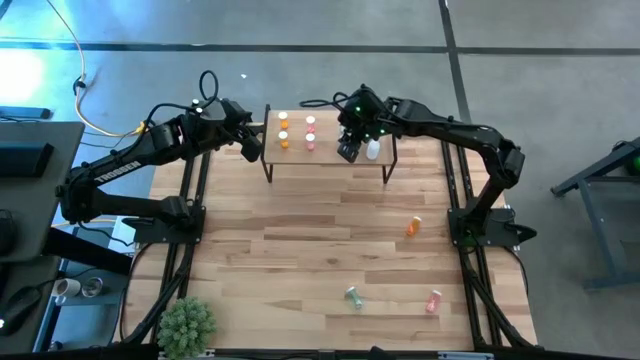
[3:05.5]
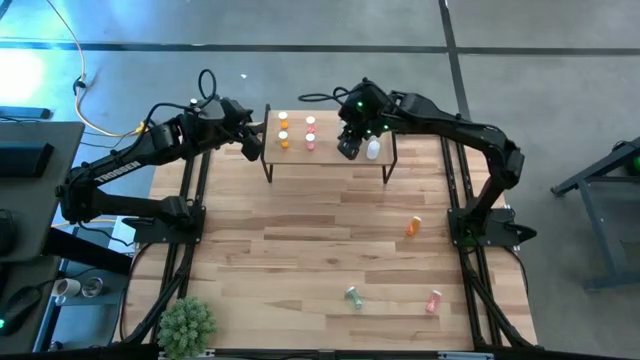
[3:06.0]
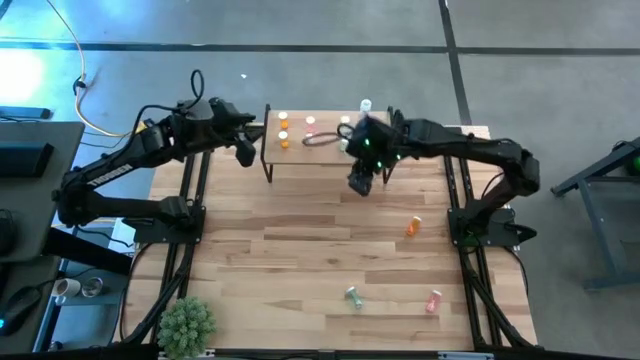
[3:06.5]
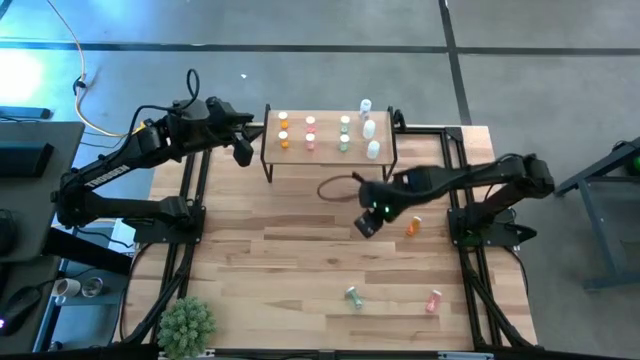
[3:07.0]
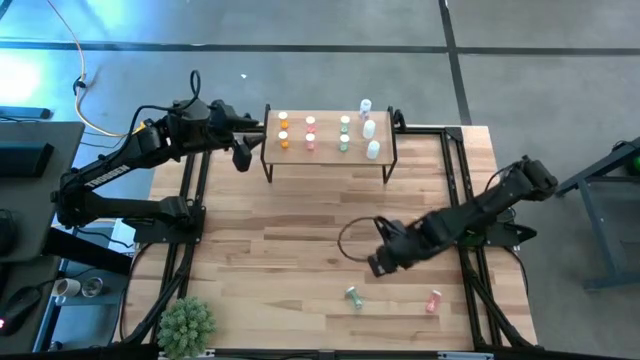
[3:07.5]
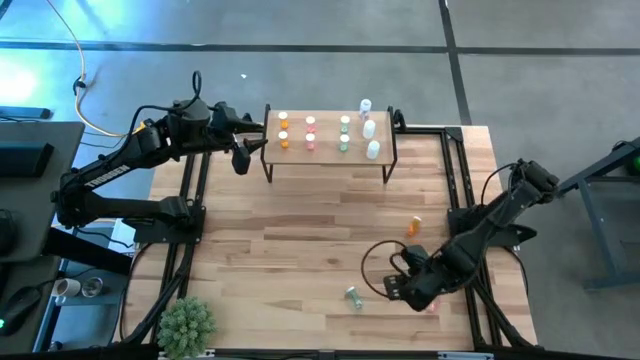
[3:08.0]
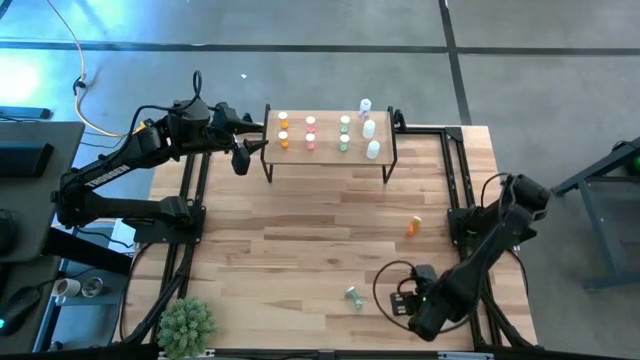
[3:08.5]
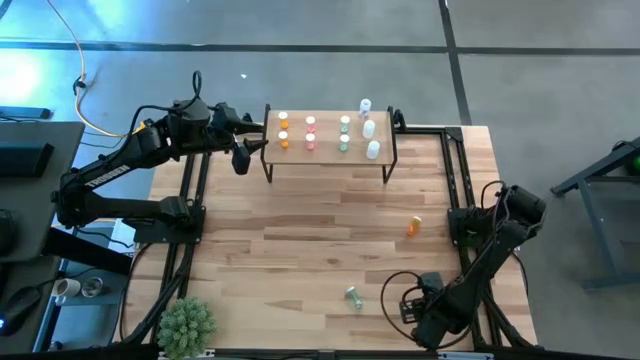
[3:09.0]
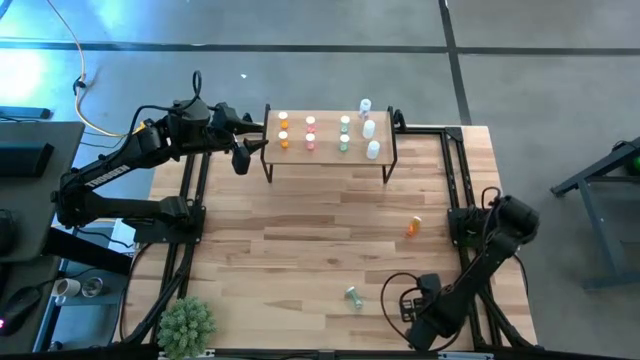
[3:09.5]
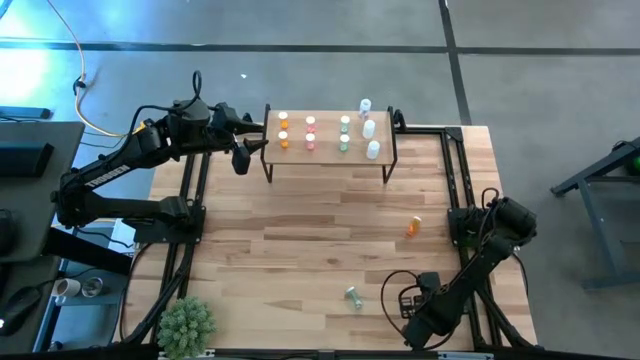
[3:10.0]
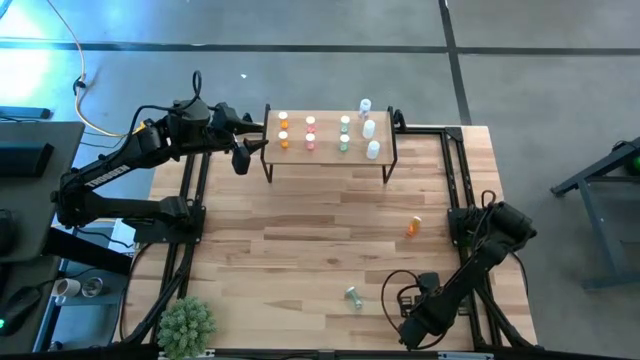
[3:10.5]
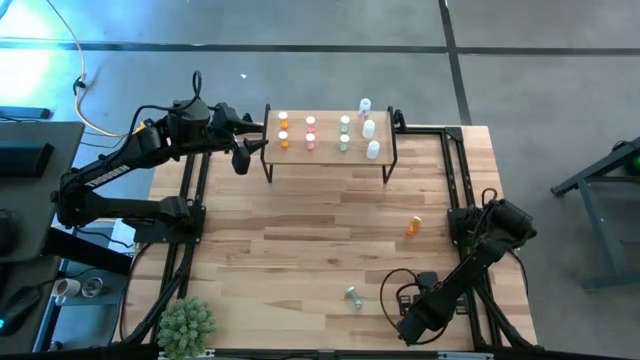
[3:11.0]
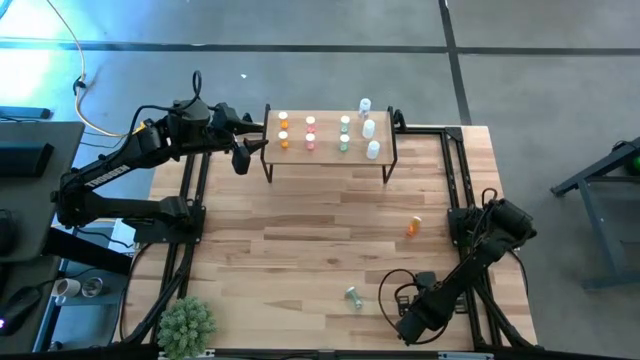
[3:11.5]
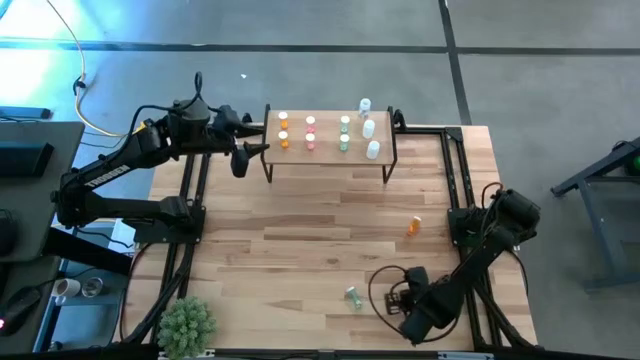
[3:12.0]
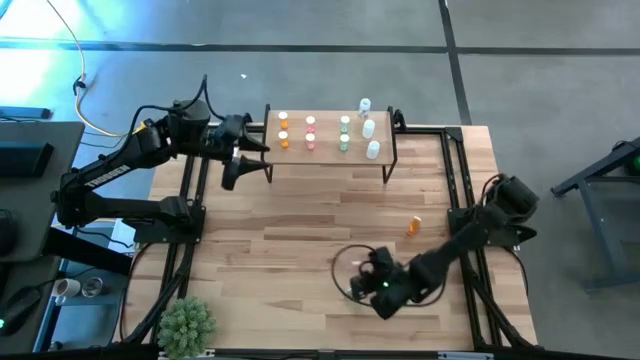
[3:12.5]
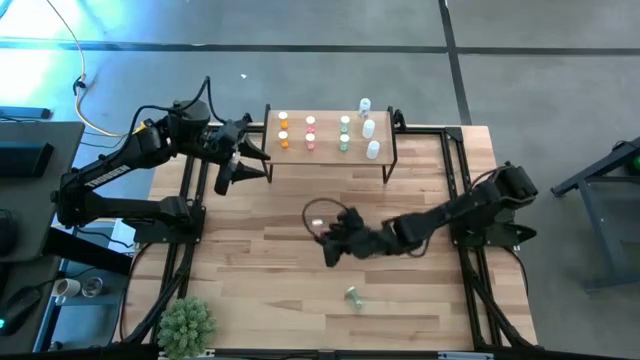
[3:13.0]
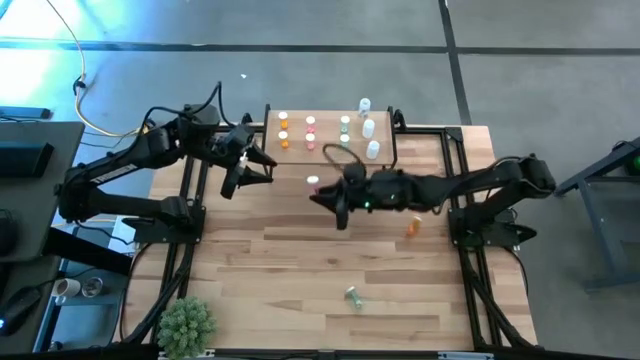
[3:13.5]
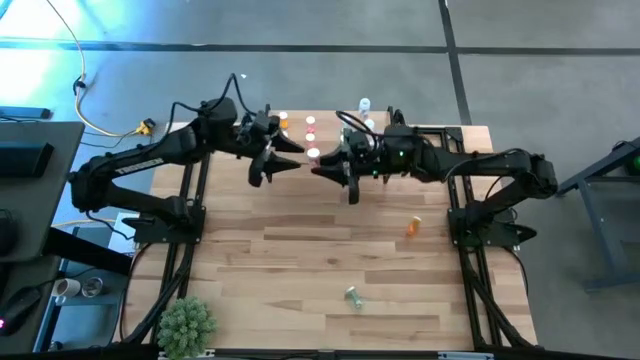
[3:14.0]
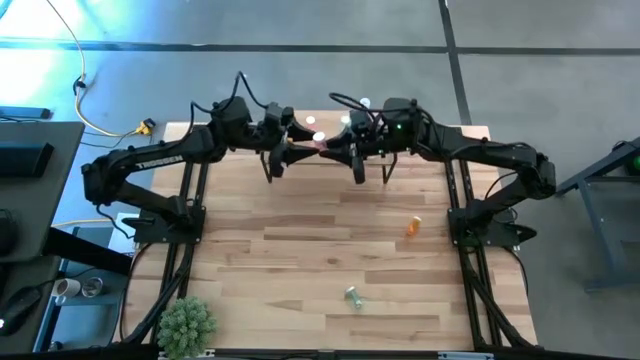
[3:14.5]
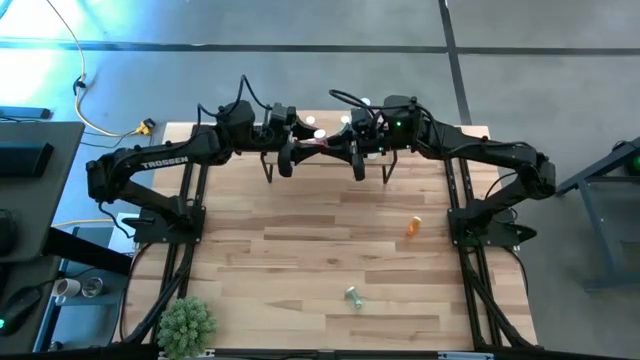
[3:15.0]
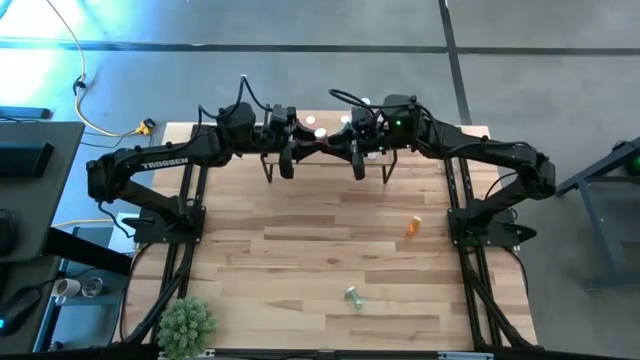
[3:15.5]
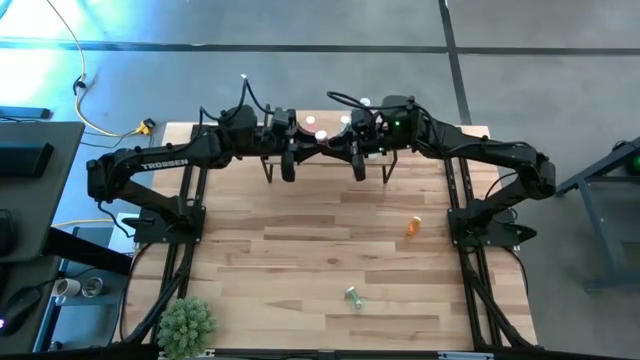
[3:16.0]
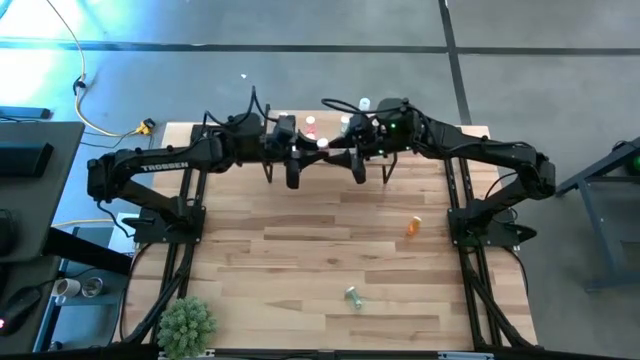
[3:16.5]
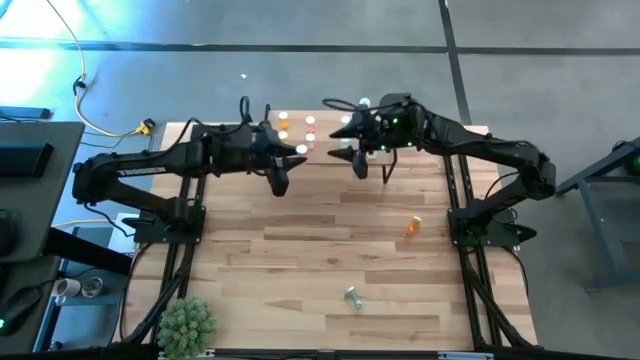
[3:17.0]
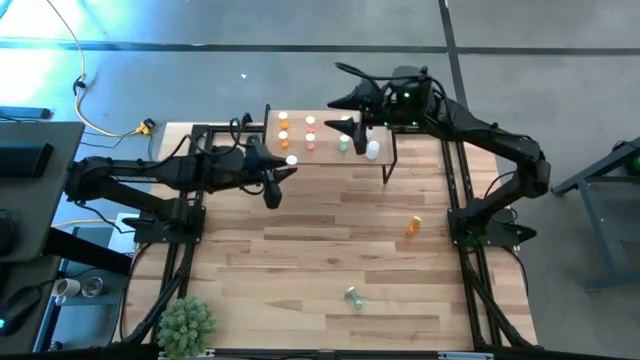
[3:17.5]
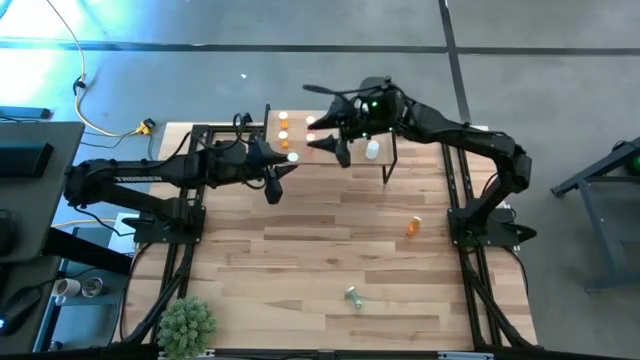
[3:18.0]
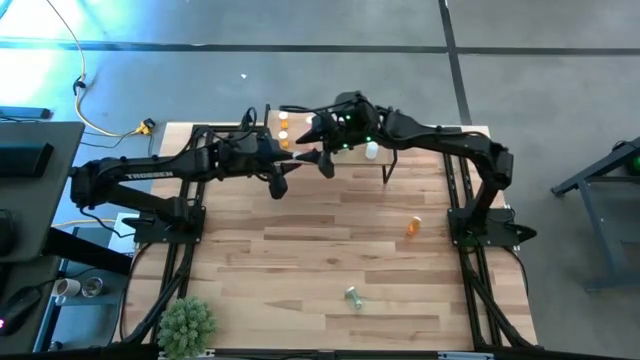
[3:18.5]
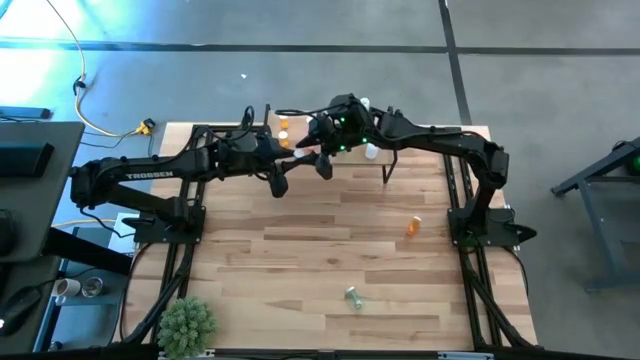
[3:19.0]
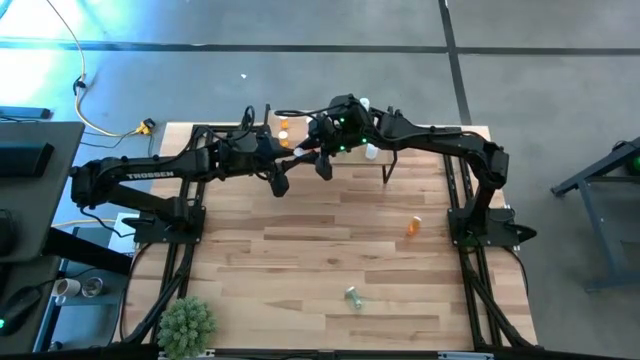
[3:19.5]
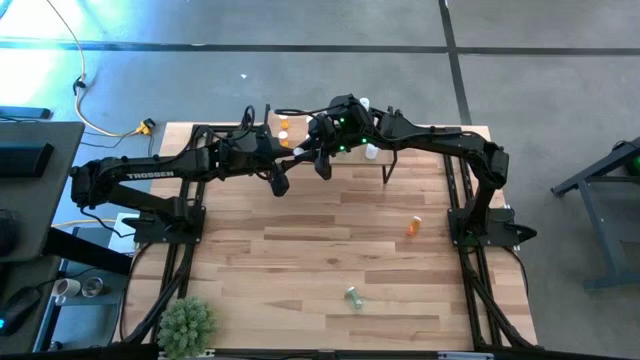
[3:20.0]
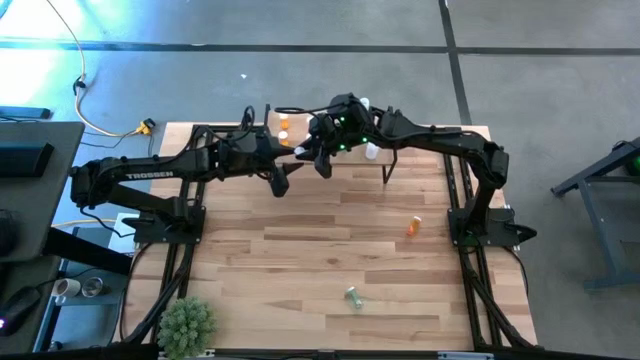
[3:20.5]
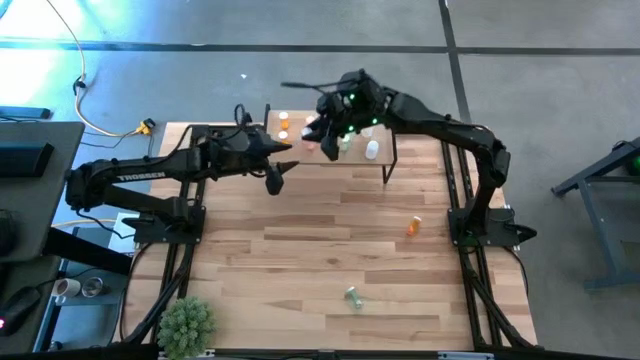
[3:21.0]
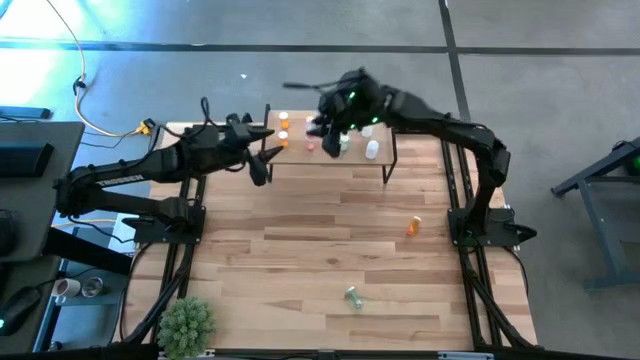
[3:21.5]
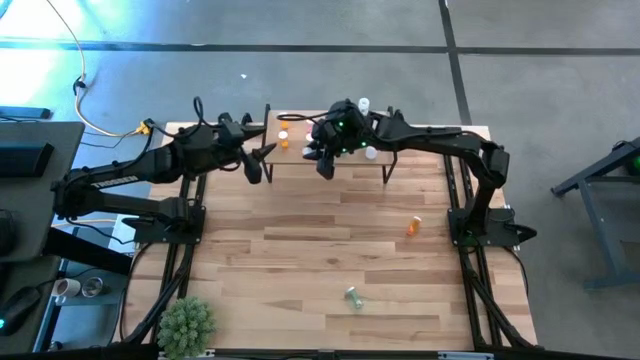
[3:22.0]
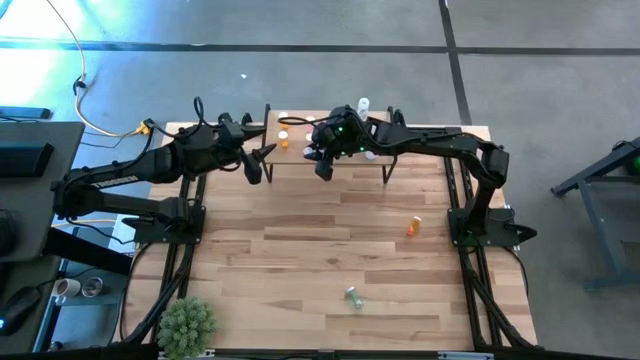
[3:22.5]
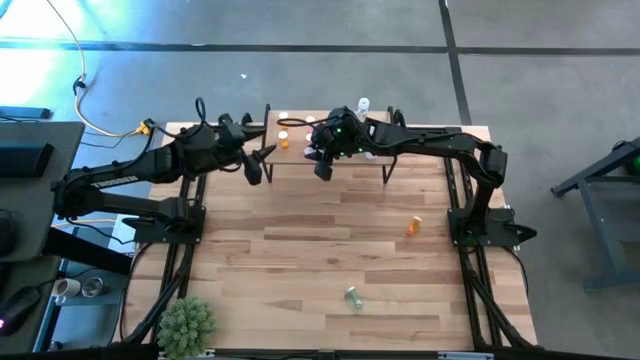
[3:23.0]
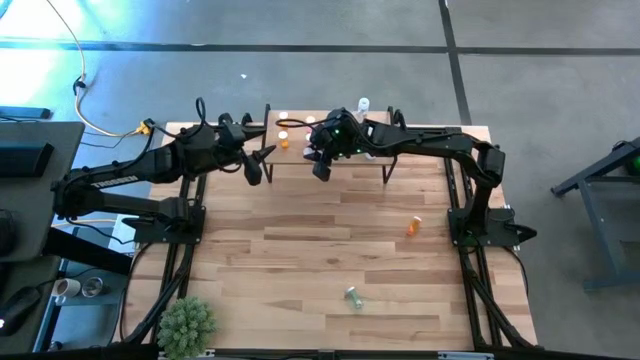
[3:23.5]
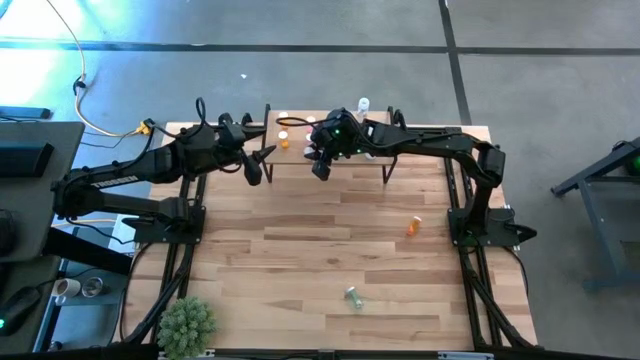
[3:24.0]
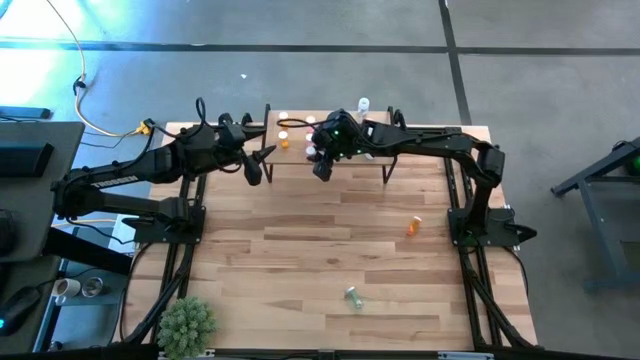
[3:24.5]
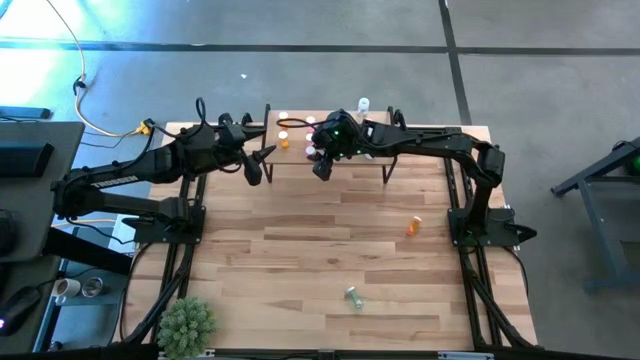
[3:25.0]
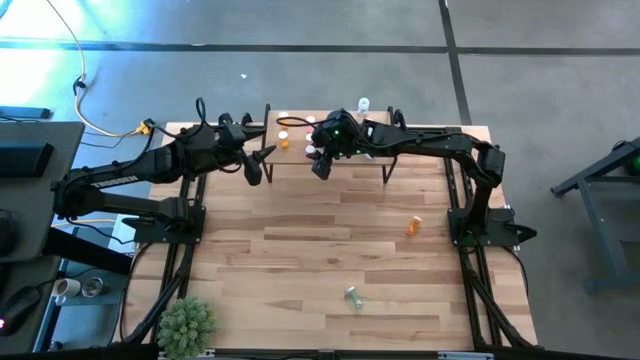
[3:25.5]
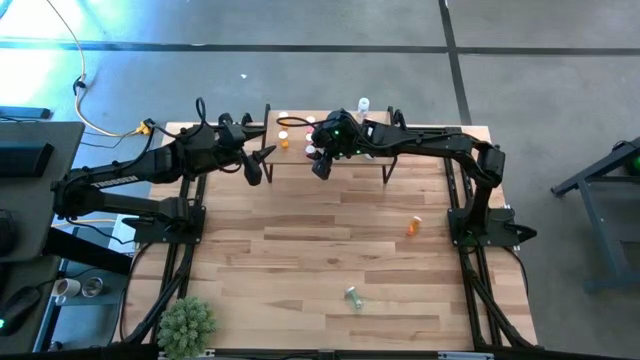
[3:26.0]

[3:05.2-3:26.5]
Task: Pick and place medicine bottles onto shelf by color
Put the pink pill bottle on the shelf aligned with the pink pill bottle

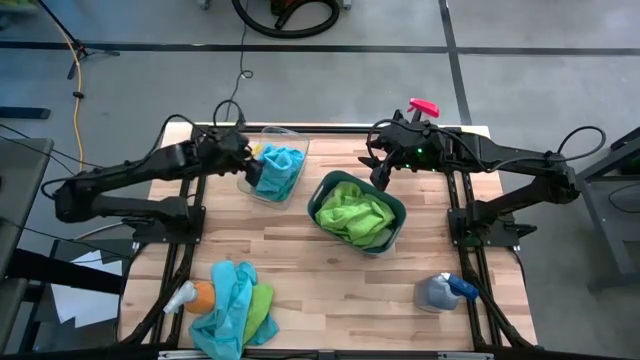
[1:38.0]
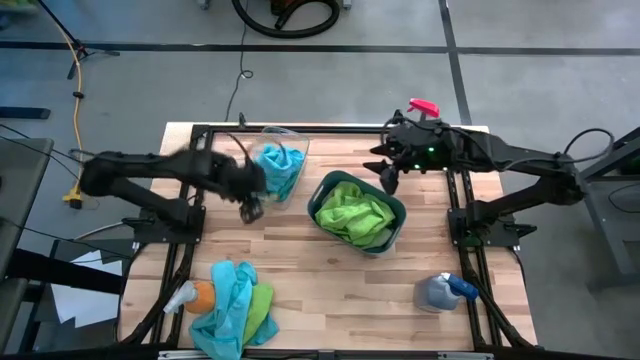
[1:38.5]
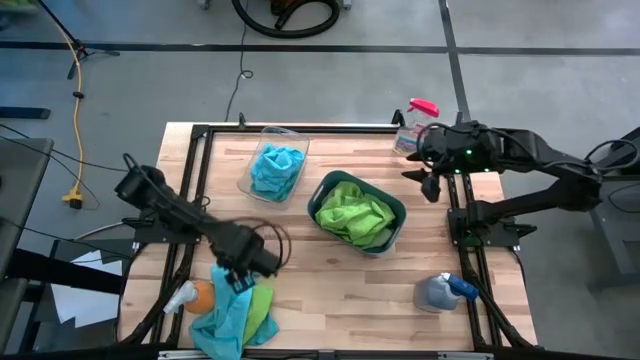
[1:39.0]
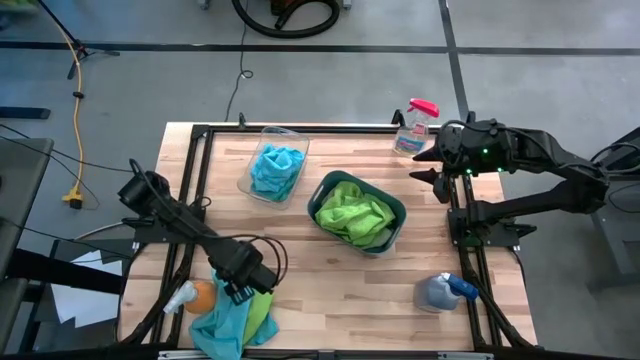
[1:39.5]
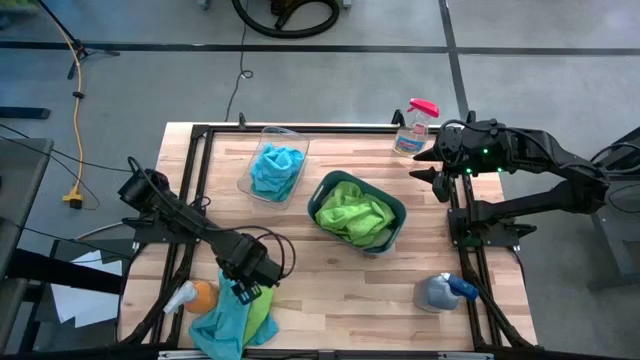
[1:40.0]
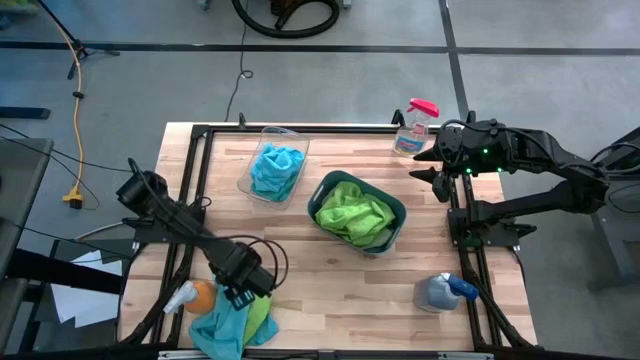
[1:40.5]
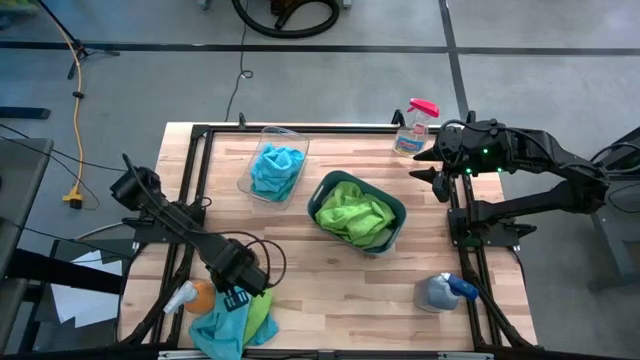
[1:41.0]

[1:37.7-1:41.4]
Task: Sort microfiber towel by color & place in baskets
Put the blue microfiber towel into the transparent bin
